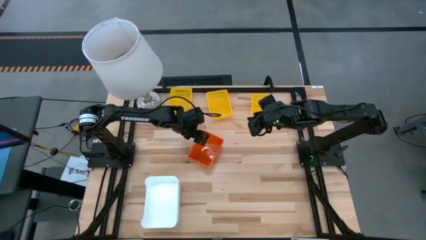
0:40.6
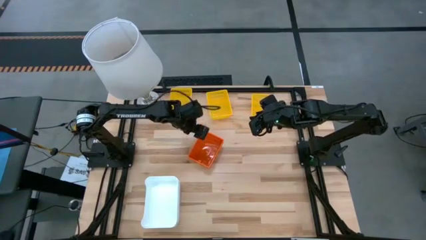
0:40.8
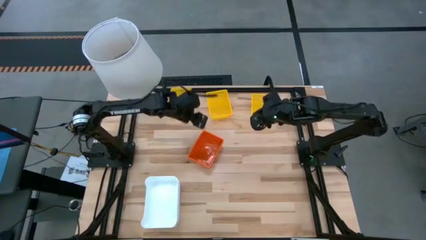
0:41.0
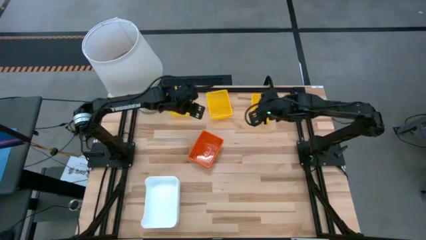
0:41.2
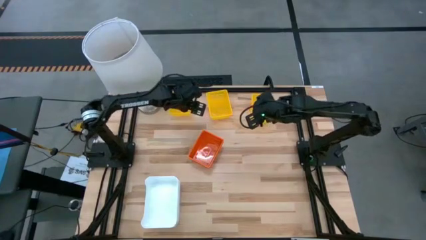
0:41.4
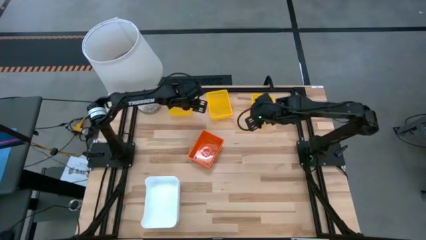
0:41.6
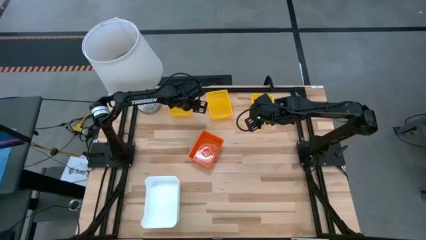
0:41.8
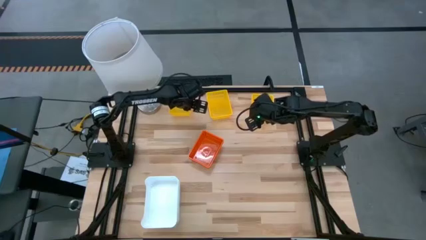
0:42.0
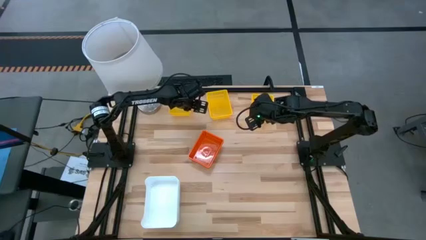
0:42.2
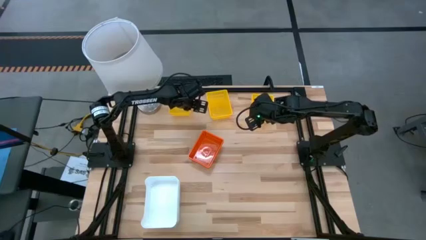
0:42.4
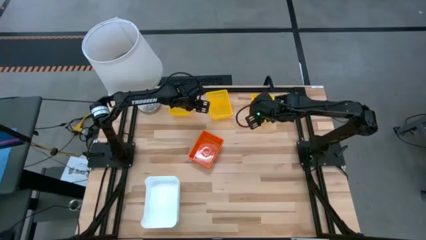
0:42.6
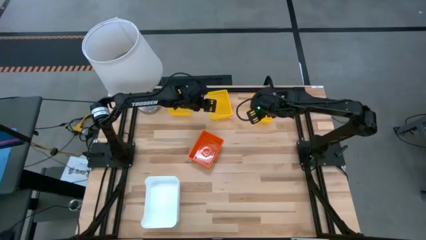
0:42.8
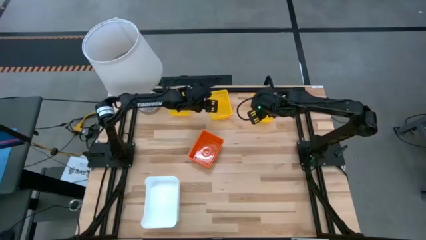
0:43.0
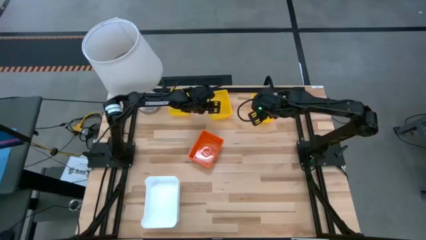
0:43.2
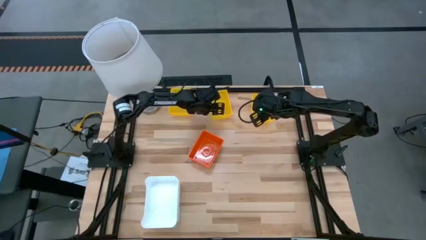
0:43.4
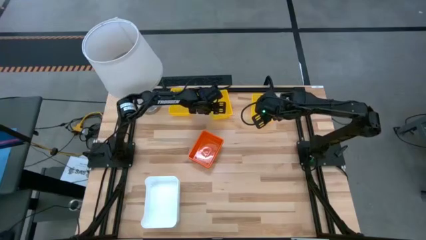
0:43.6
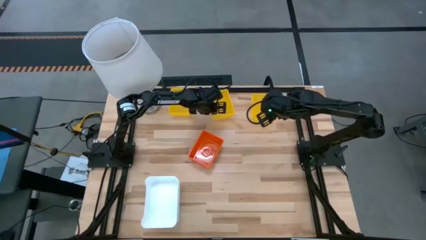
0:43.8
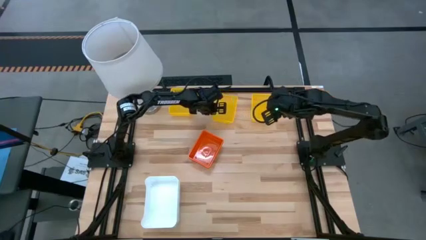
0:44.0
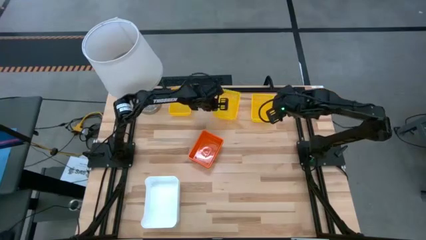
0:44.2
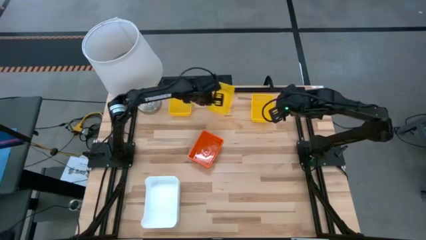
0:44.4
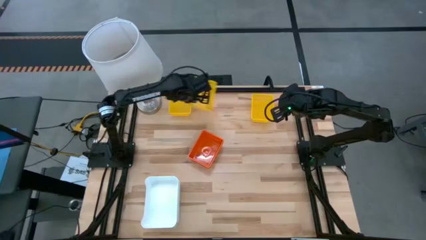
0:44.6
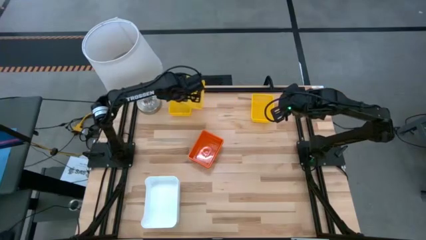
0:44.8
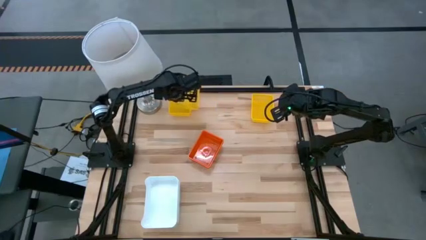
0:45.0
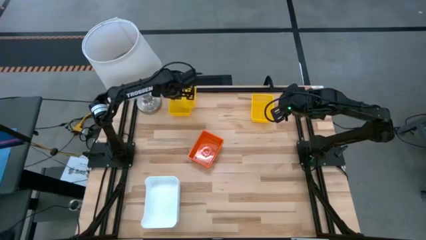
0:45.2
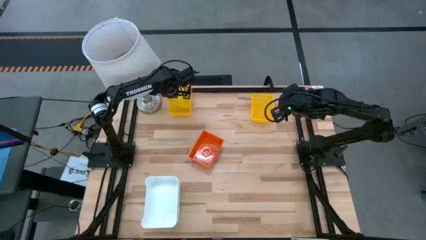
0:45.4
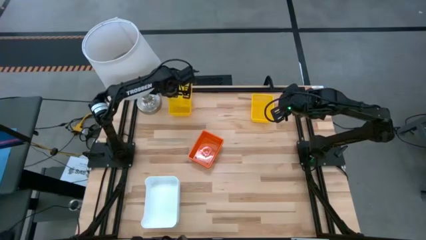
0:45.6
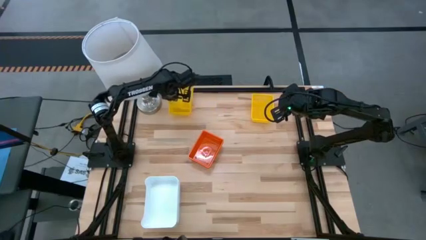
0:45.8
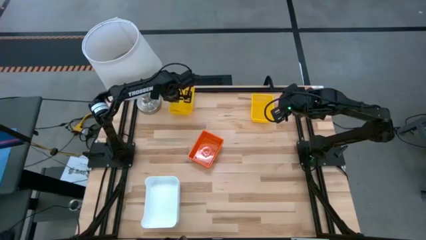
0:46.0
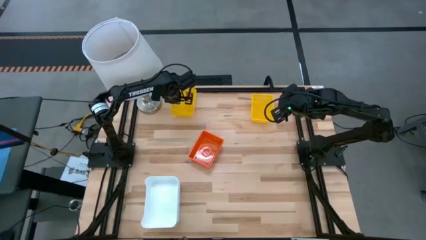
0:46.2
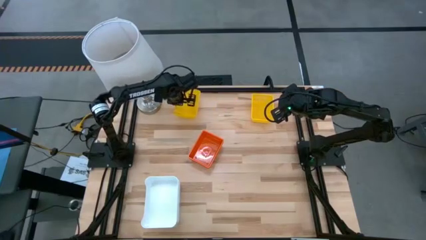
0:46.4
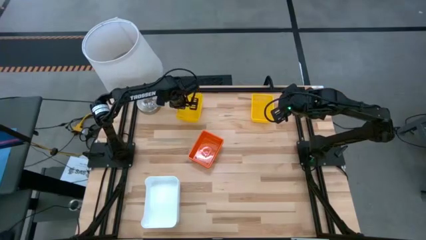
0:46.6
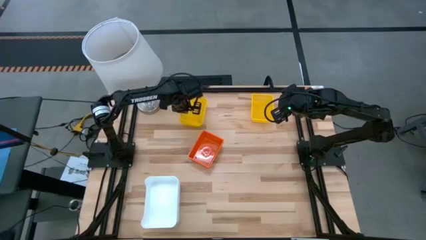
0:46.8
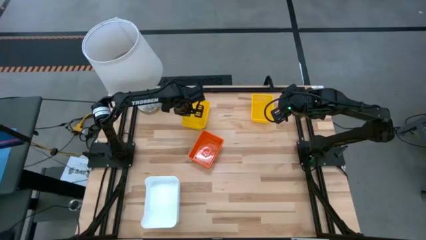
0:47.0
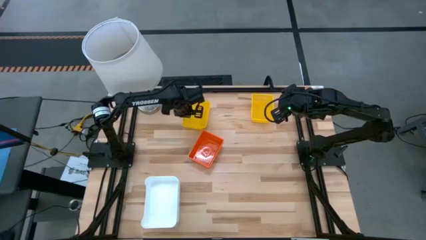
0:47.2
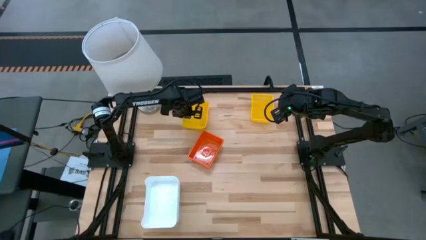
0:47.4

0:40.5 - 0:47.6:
Stack the middle yellow bin on the left yellow bin

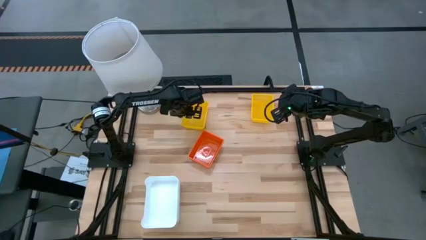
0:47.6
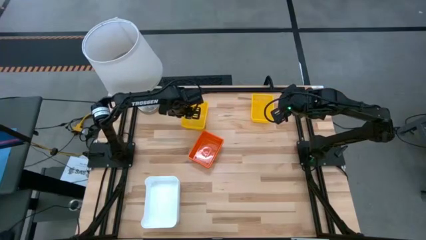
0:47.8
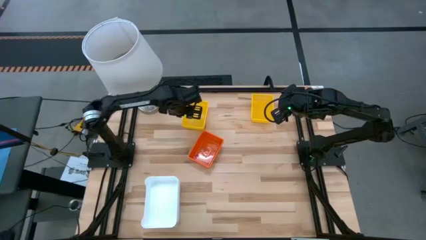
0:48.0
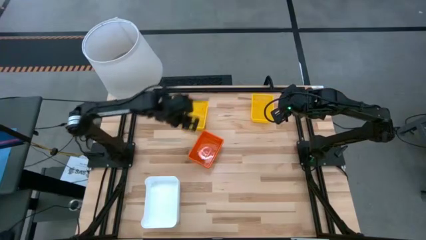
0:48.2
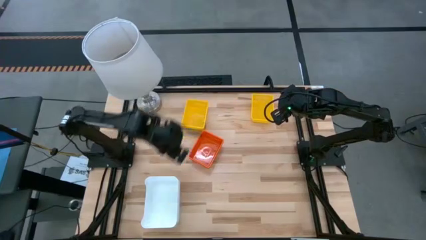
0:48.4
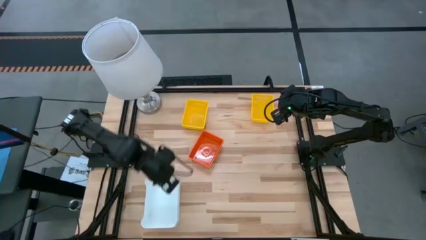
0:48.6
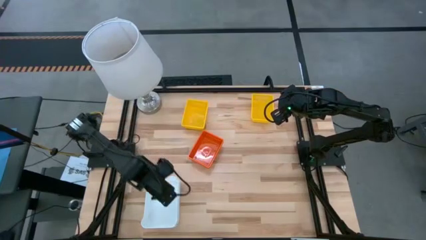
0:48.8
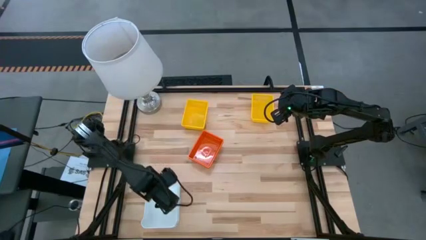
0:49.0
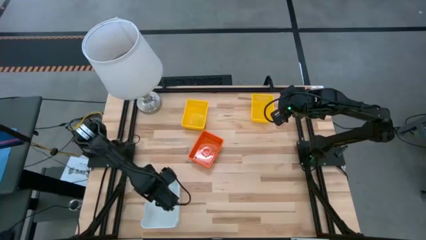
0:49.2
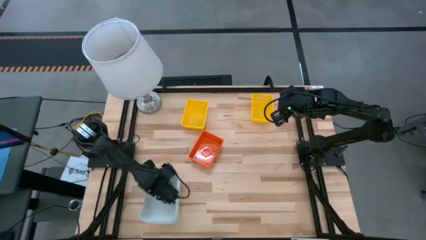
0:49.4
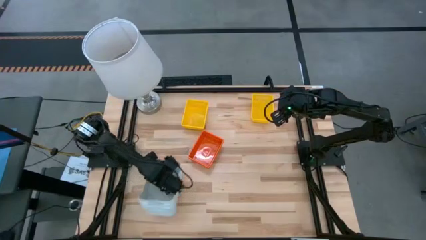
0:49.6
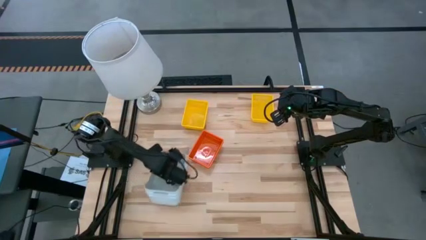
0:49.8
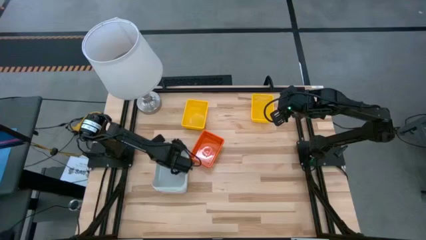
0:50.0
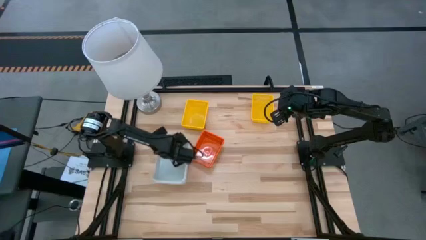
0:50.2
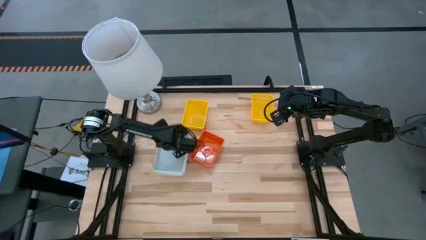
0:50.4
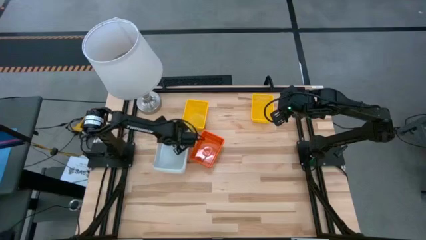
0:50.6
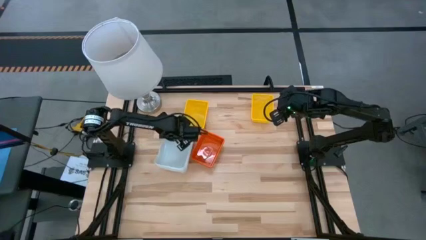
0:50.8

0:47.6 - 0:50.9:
Move the stacked white bins to the top left of the table

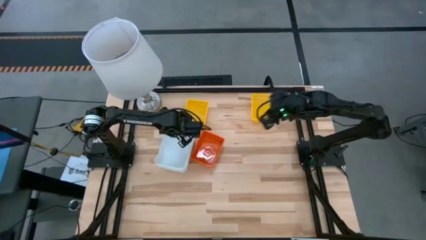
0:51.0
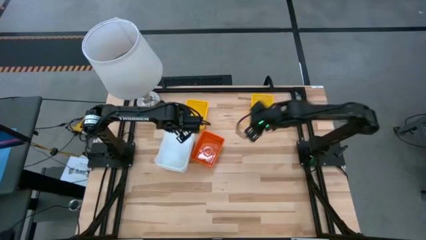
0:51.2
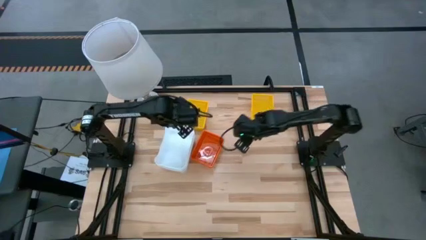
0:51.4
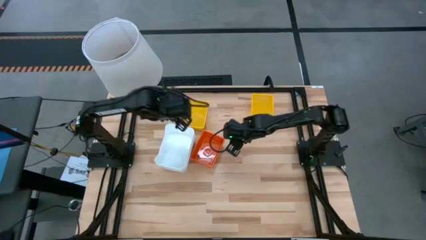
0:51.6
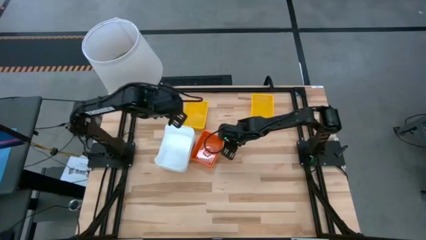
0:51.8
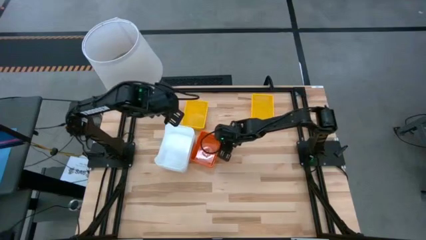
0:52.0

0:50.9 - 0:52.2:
Adjust the stacked orange bins on the table
